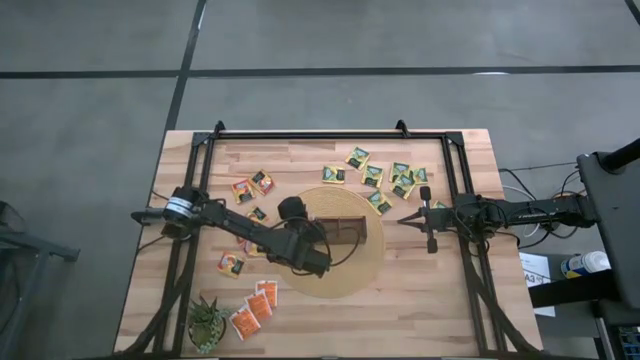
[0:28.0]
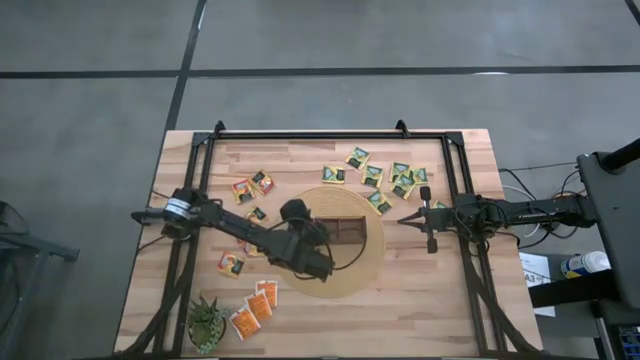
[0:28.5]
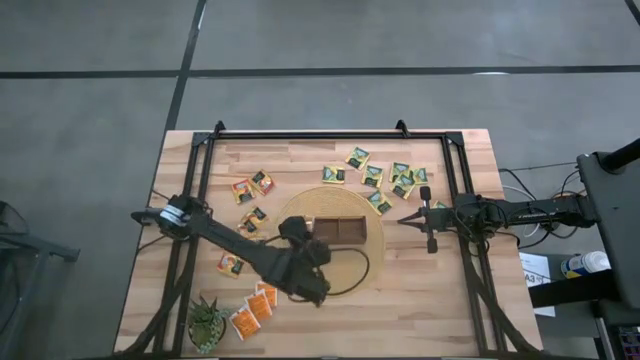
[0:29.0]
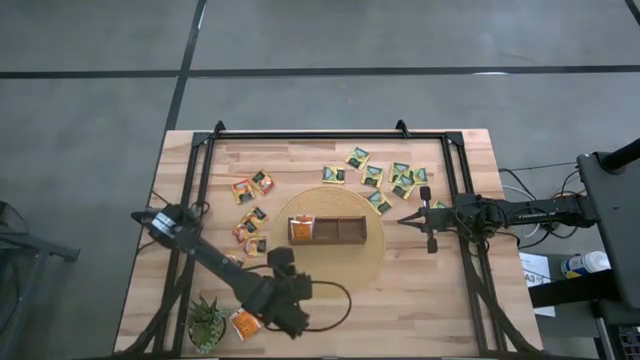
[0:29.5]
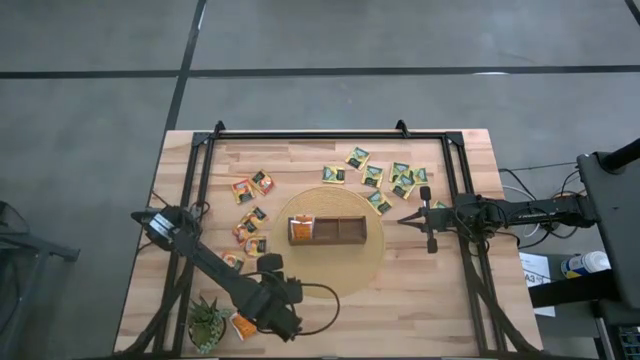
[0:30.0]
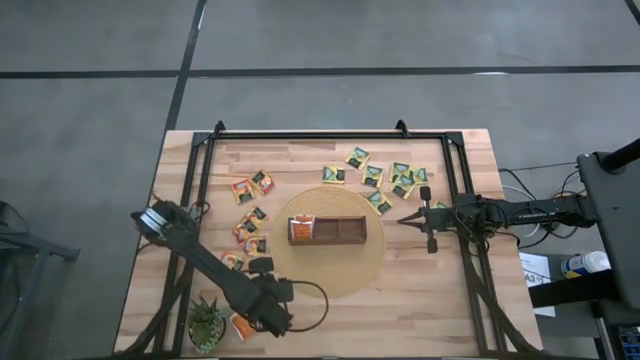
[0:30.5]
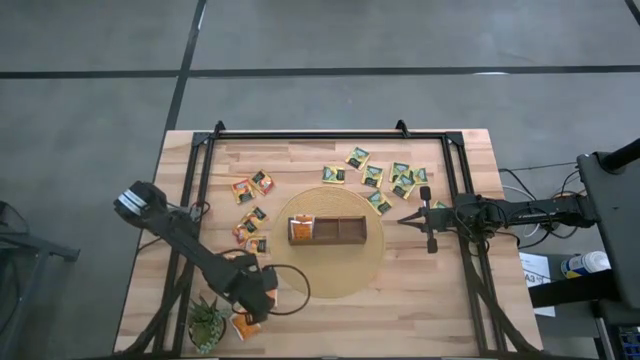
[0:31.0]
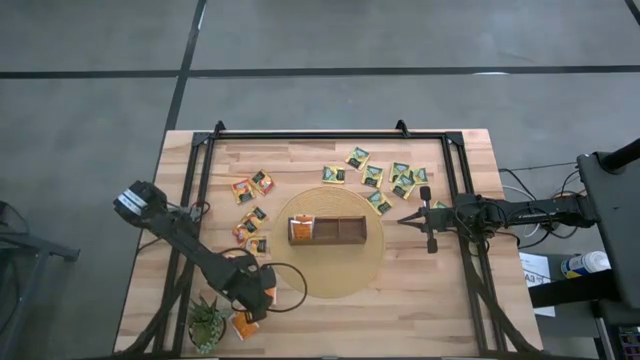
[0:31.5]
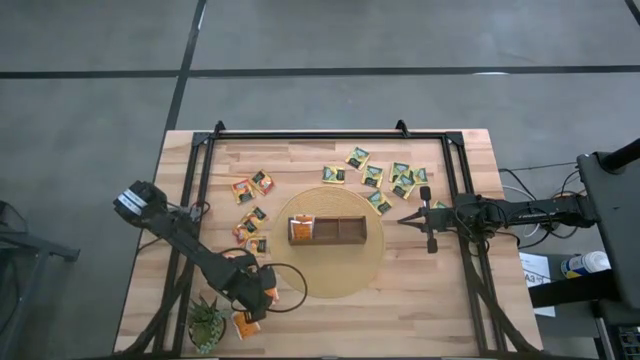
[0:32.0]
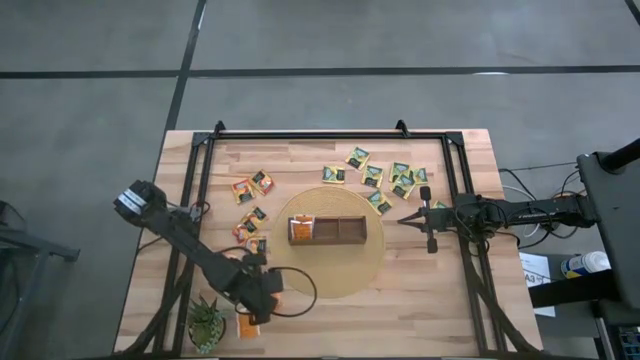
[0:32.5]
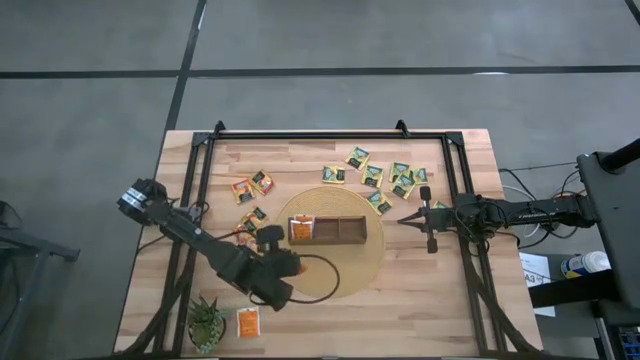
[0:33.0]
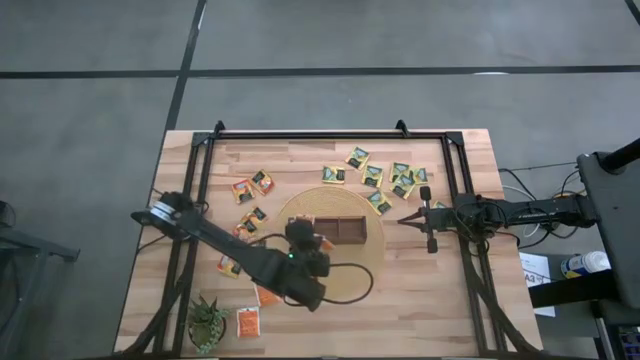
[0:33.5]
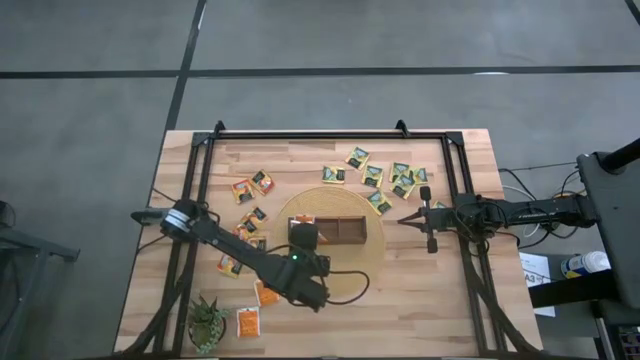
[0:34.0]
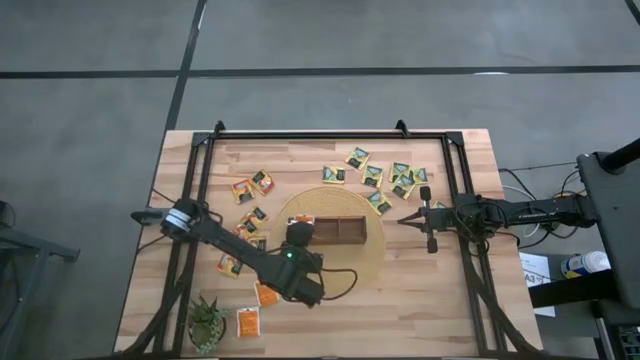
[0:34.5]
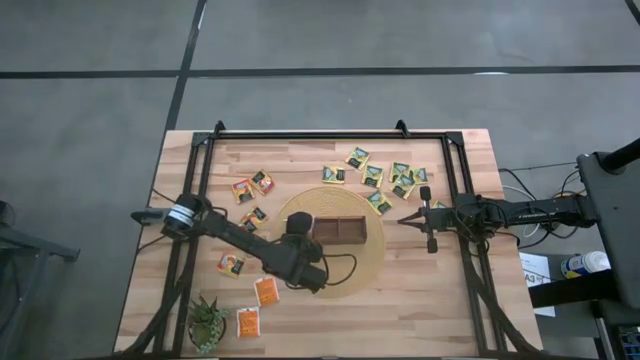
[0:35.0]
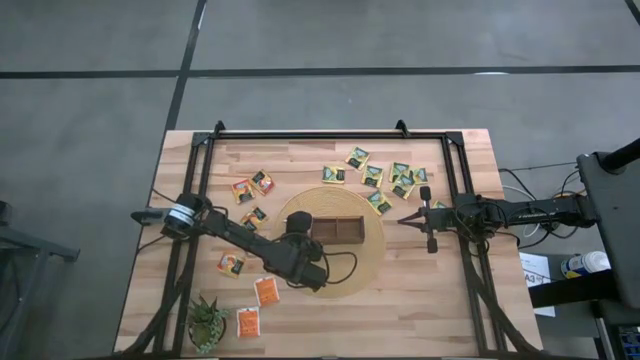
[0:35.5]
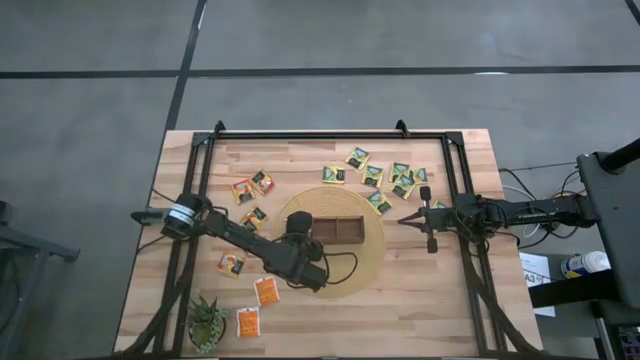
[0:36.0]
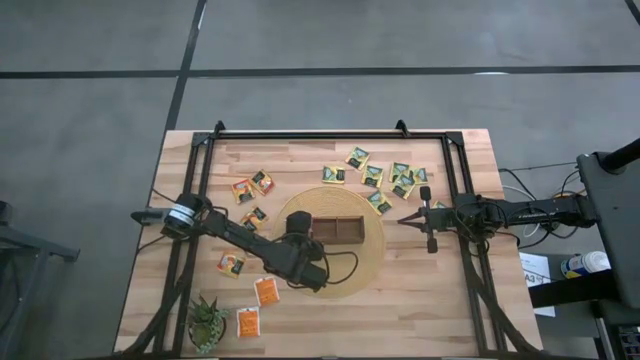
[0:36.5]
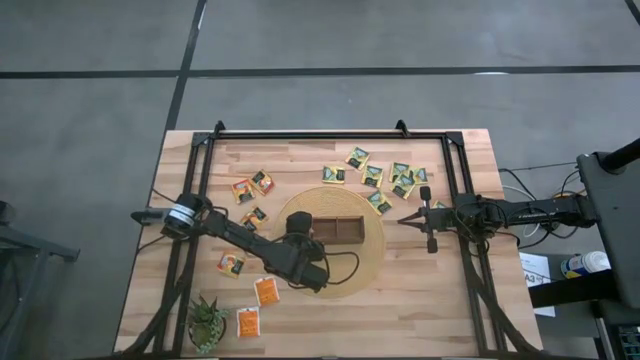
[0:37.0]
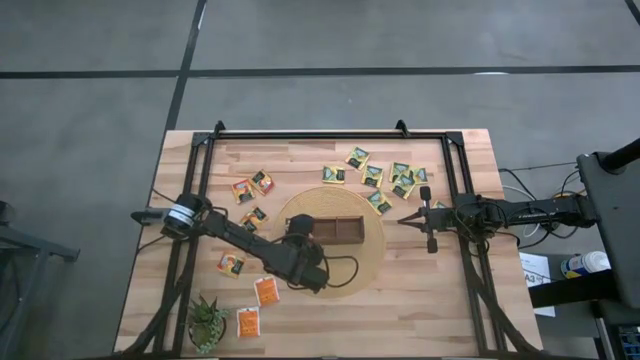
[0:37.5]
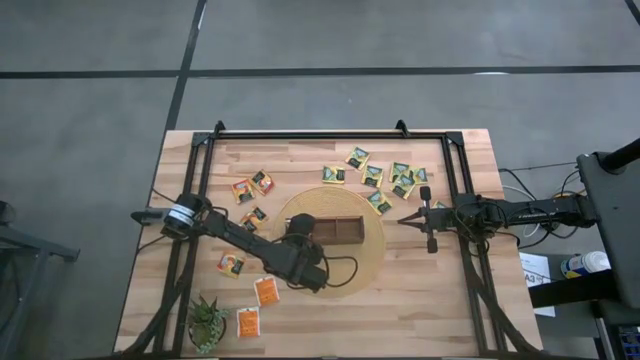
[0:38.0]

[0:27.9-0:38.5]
Task: Pick & Place Tea
Put the white orange tea bag into the left section of the wooden organizer

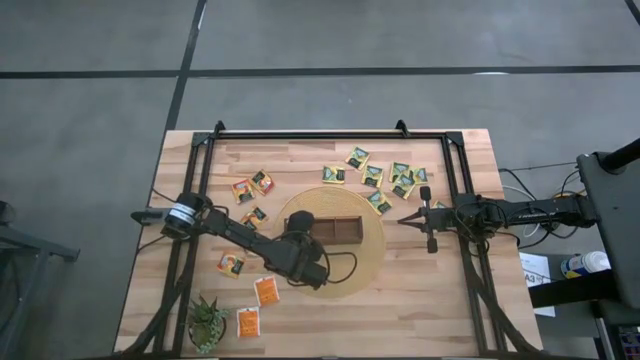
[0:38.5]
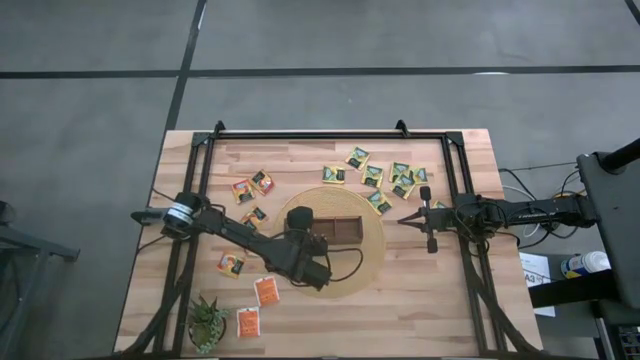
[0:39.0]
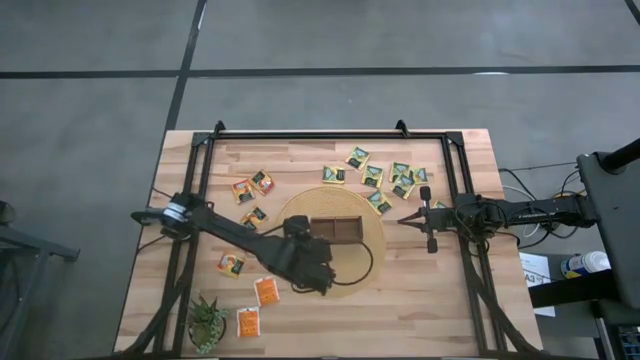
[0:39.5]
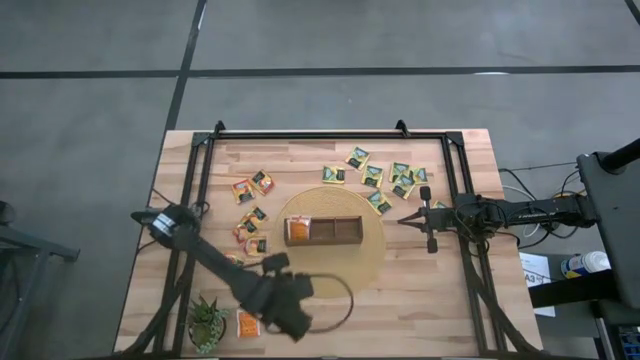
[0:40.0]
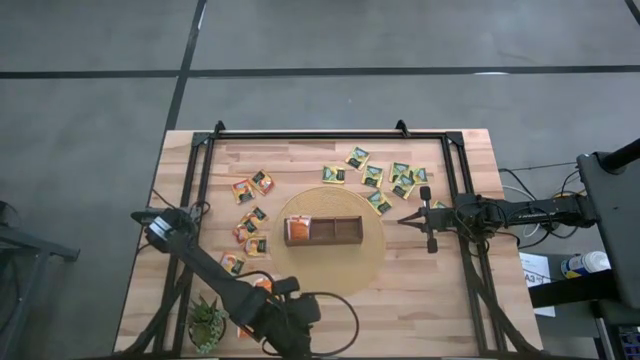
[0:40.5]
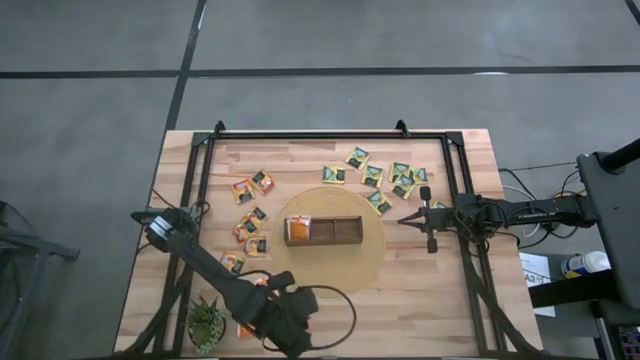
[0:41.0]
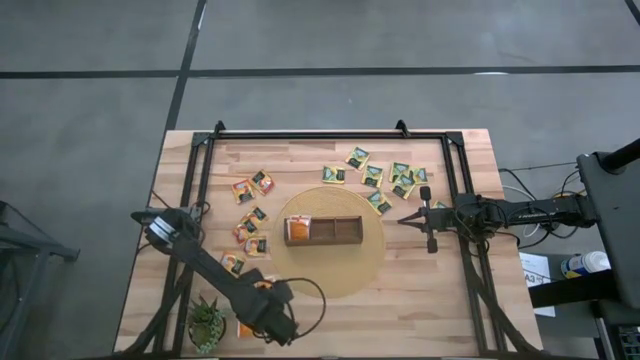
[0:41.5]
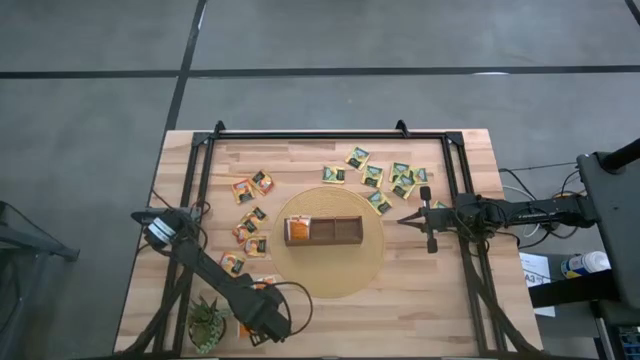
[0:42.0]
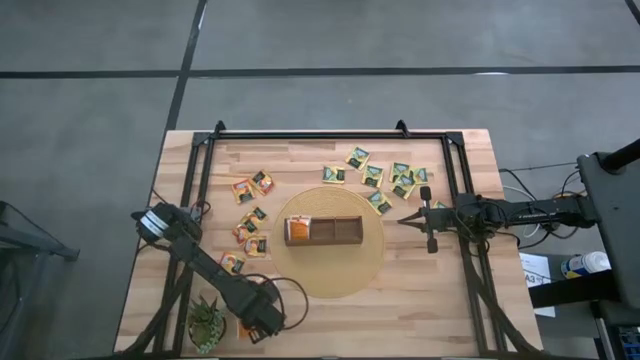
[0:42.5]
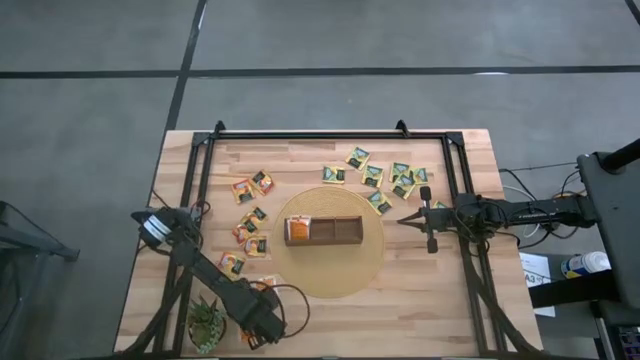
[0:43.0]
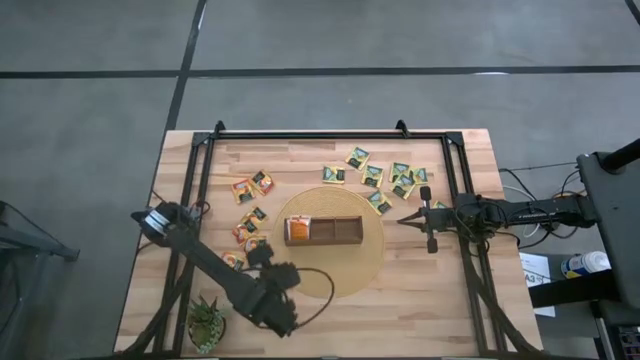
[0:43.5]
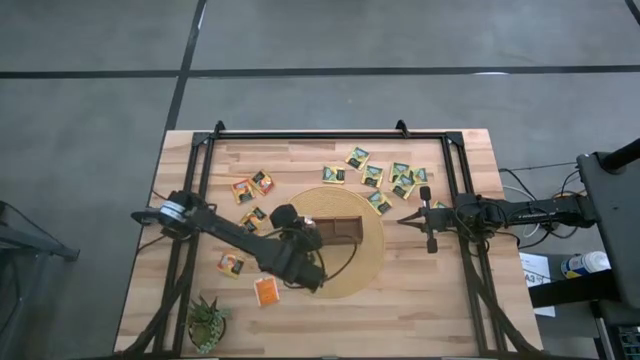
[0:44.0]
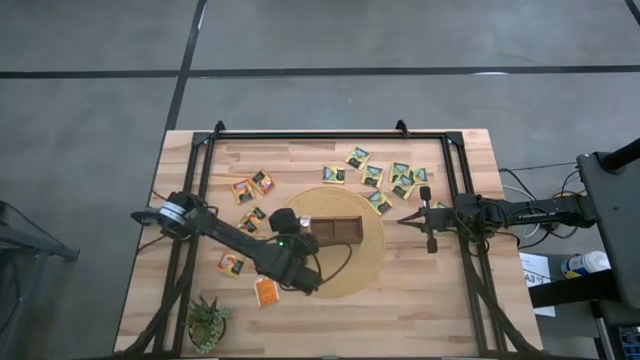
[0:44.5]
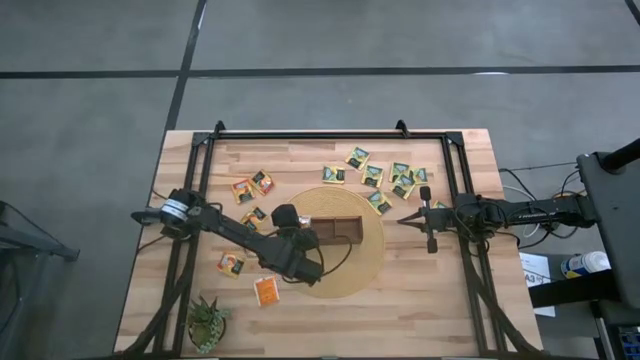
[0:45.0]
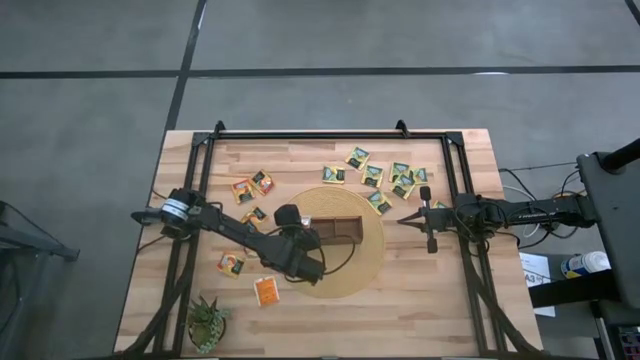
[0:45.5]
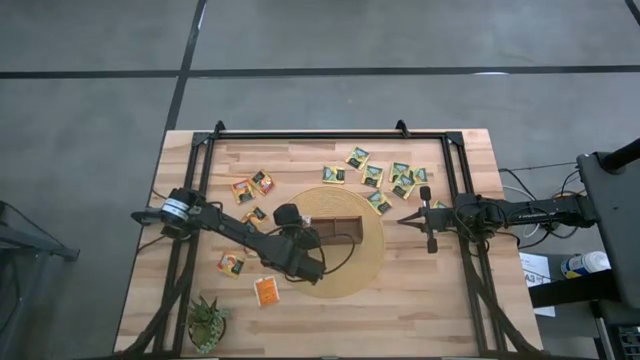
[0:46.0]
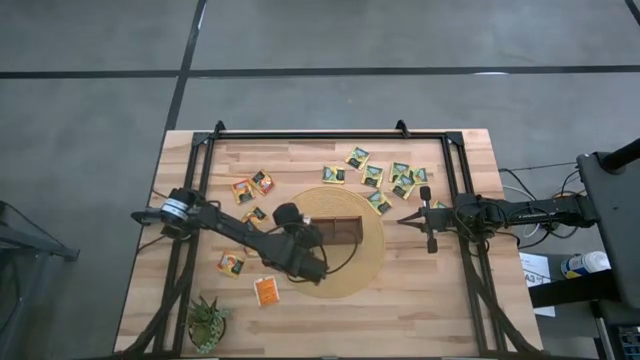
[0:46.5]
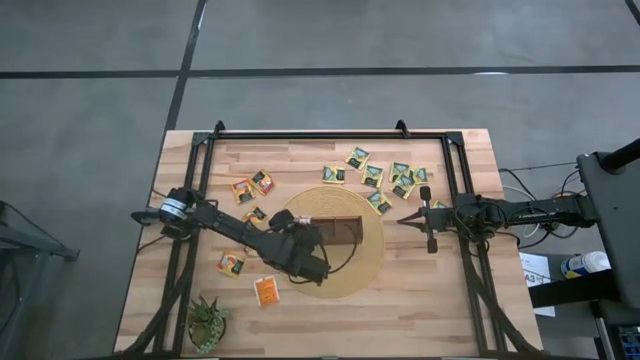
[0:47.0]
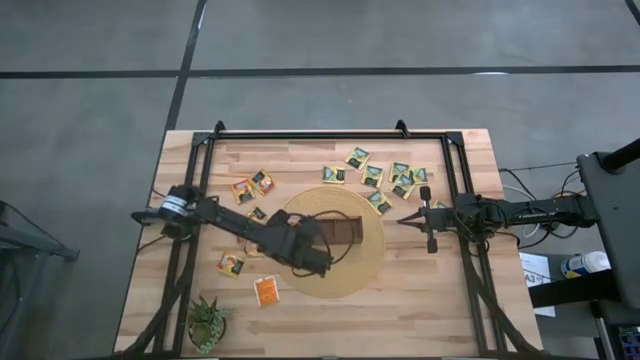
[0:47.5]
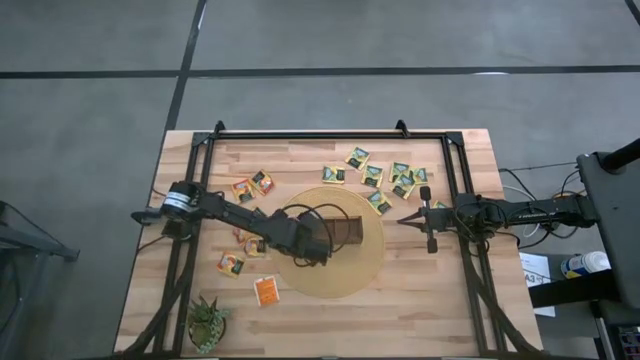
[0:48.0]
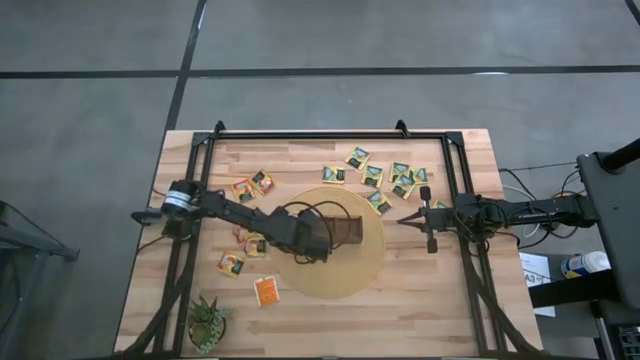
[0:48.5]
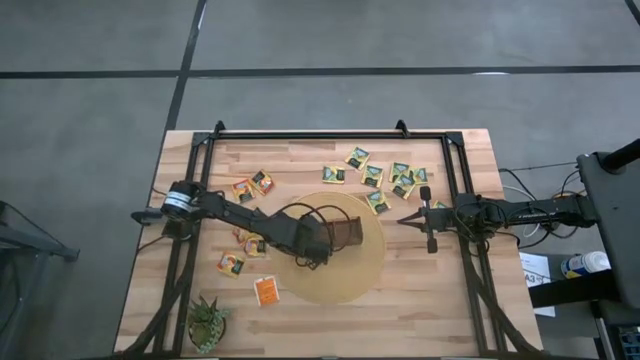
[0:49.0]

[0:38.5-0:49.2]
Put the white orange tea bag into the left section of the wooden organizer
